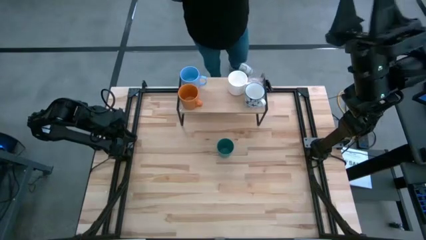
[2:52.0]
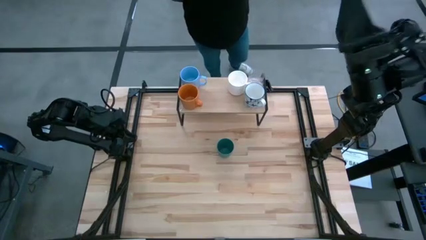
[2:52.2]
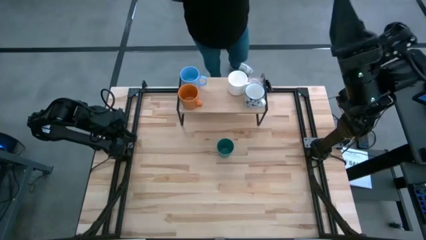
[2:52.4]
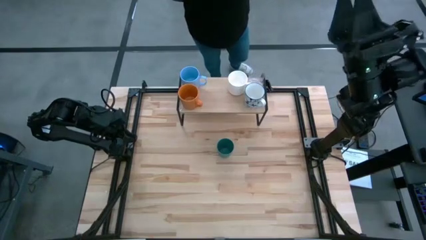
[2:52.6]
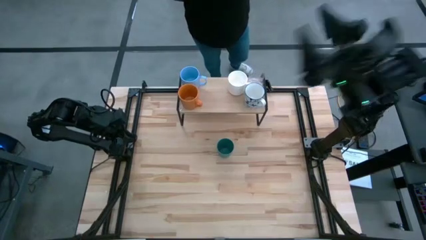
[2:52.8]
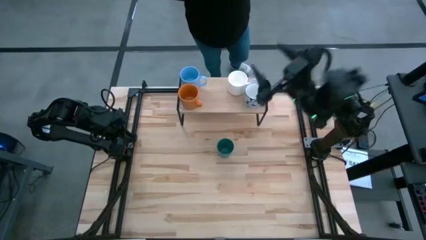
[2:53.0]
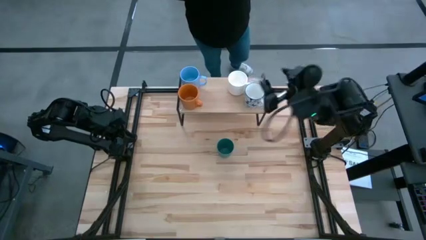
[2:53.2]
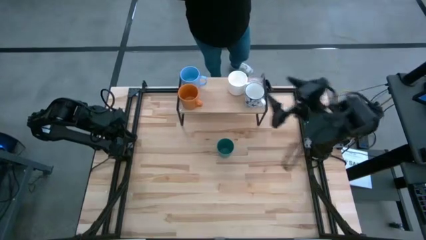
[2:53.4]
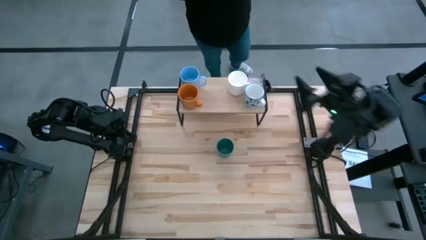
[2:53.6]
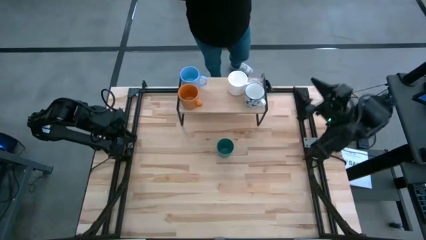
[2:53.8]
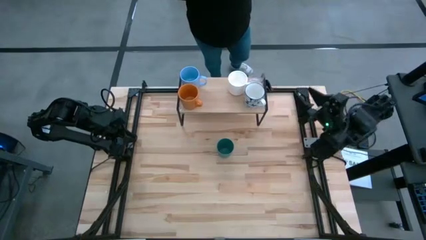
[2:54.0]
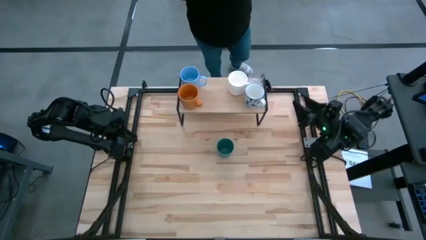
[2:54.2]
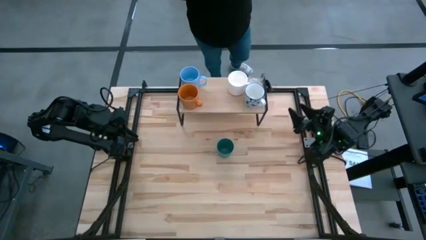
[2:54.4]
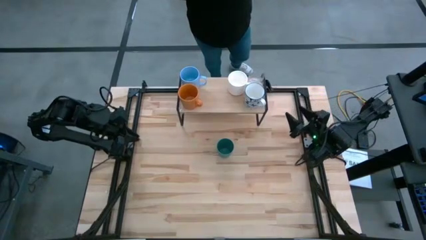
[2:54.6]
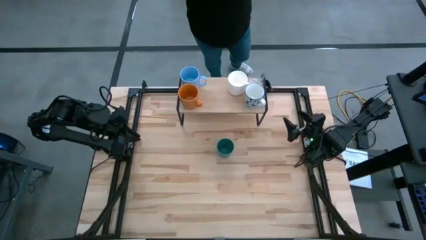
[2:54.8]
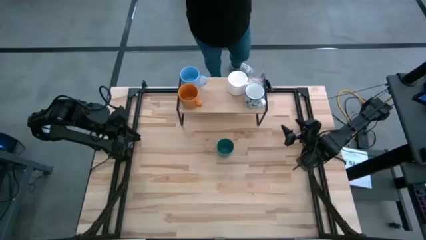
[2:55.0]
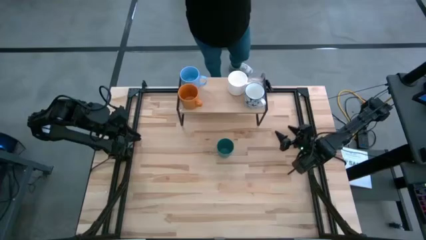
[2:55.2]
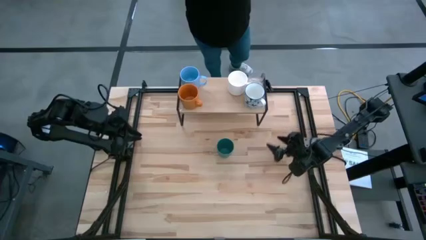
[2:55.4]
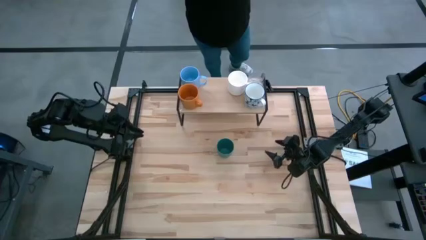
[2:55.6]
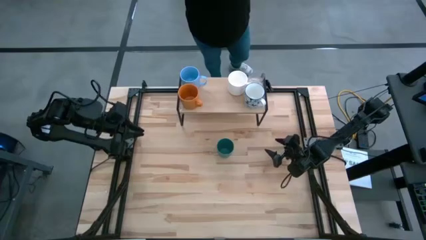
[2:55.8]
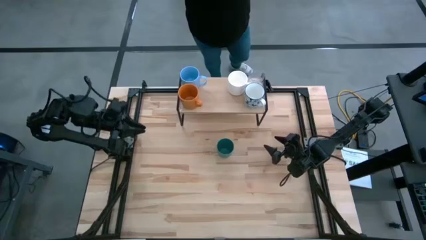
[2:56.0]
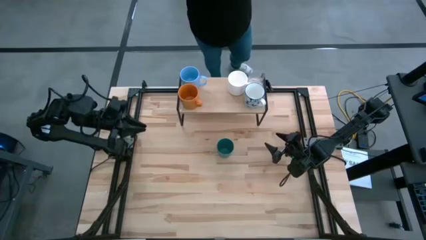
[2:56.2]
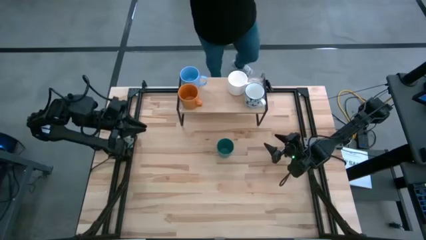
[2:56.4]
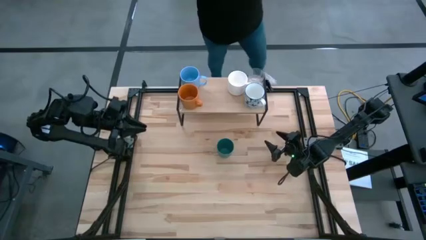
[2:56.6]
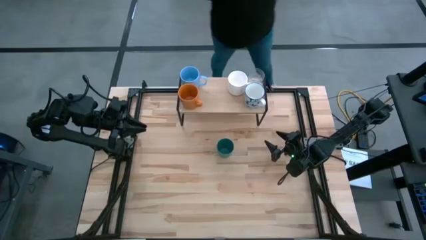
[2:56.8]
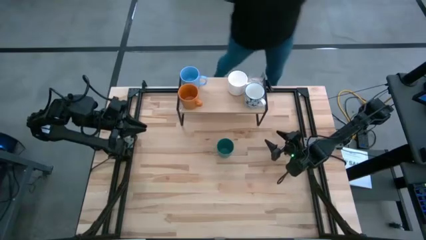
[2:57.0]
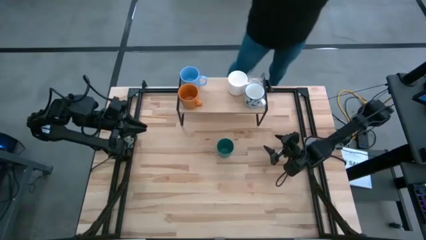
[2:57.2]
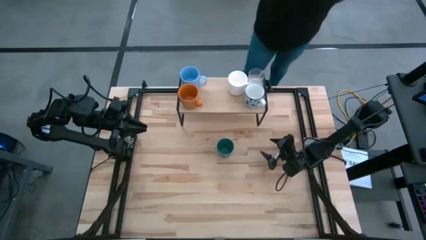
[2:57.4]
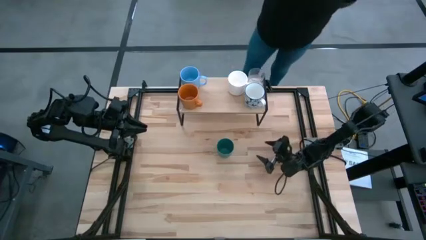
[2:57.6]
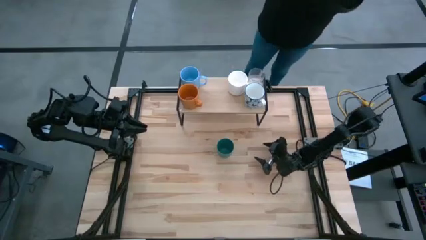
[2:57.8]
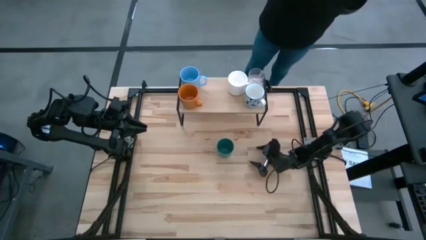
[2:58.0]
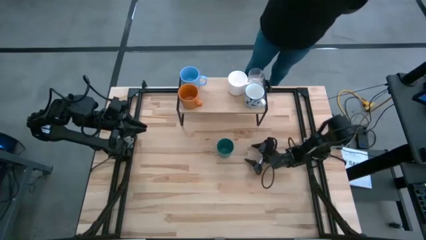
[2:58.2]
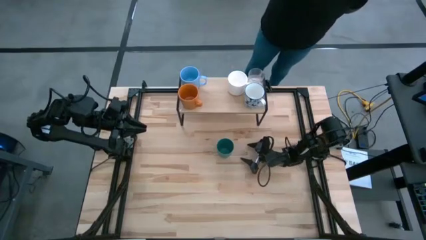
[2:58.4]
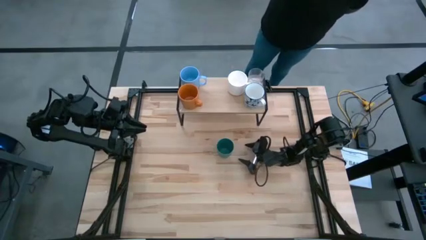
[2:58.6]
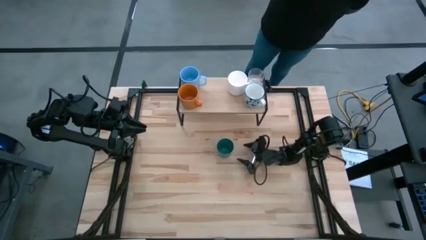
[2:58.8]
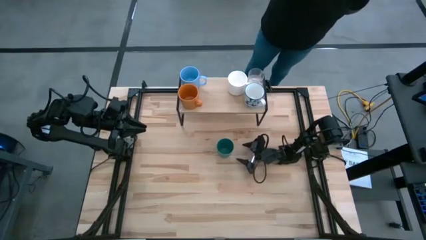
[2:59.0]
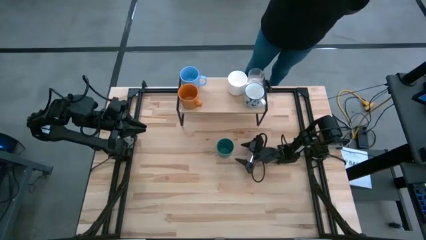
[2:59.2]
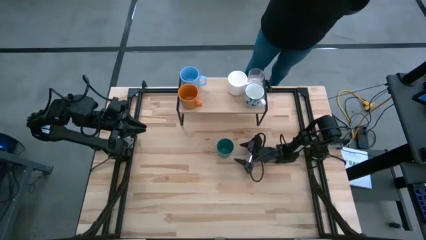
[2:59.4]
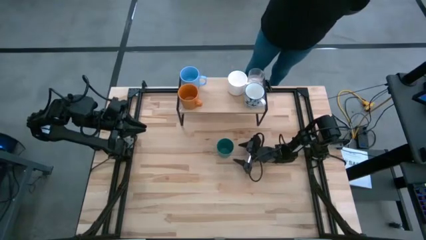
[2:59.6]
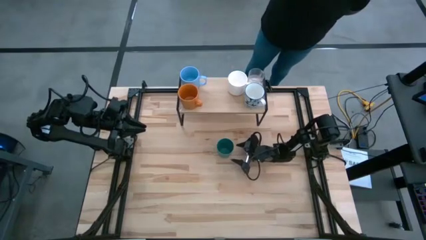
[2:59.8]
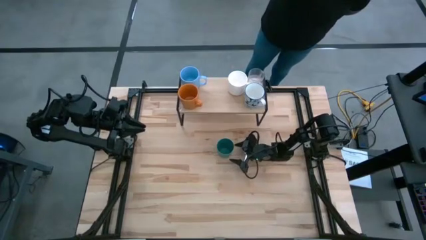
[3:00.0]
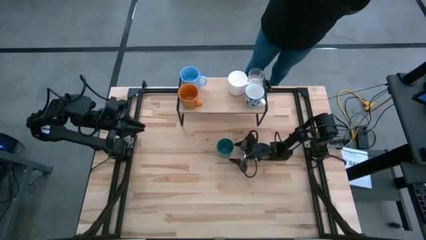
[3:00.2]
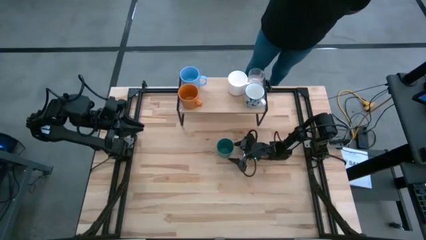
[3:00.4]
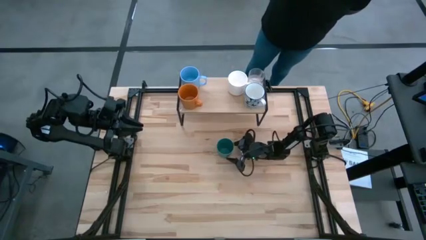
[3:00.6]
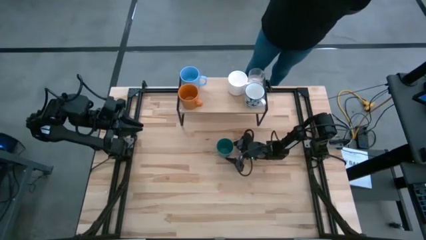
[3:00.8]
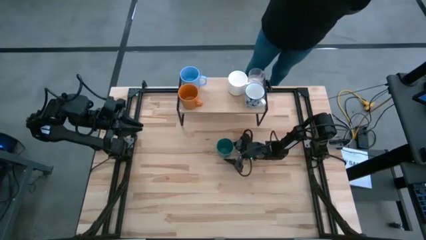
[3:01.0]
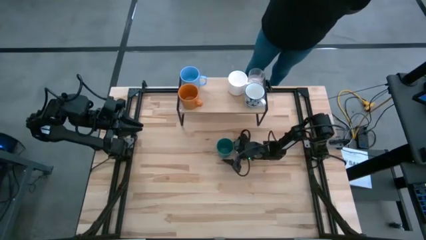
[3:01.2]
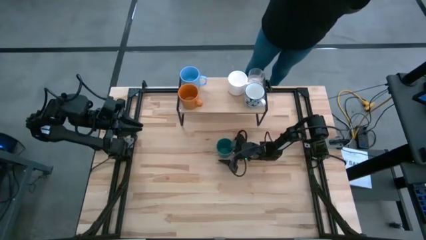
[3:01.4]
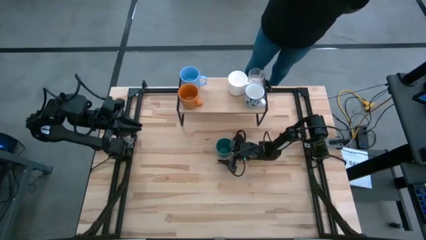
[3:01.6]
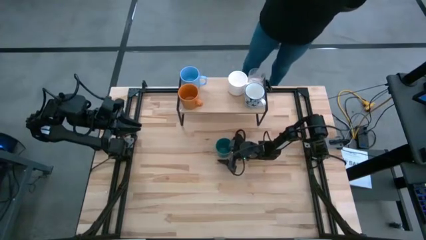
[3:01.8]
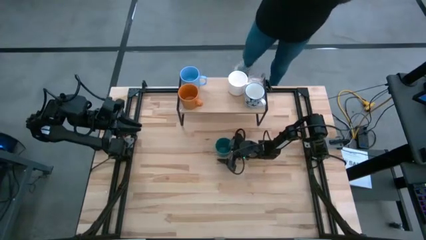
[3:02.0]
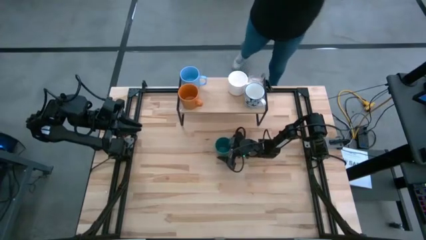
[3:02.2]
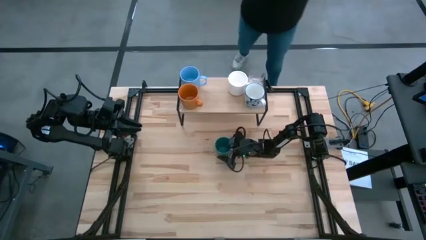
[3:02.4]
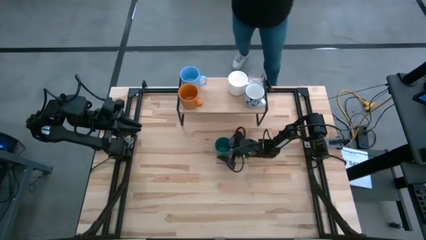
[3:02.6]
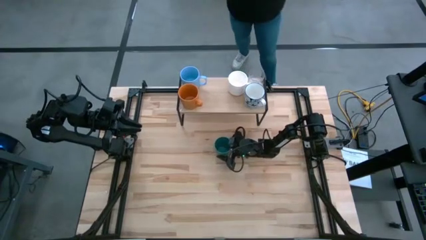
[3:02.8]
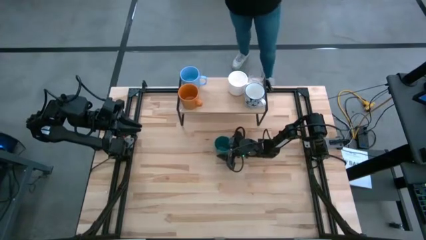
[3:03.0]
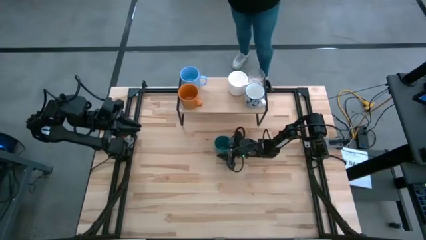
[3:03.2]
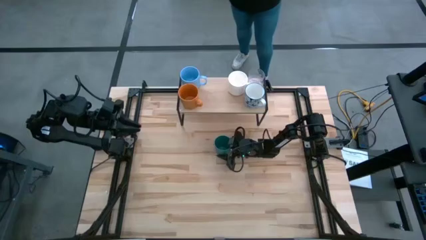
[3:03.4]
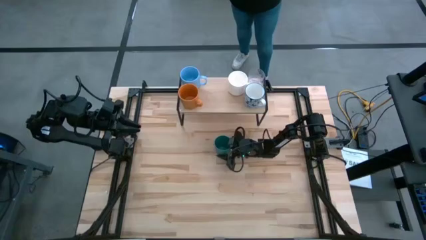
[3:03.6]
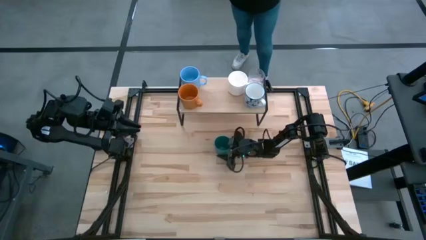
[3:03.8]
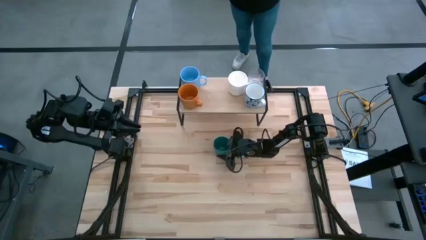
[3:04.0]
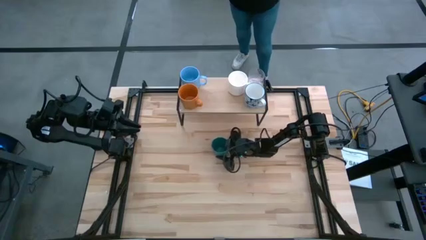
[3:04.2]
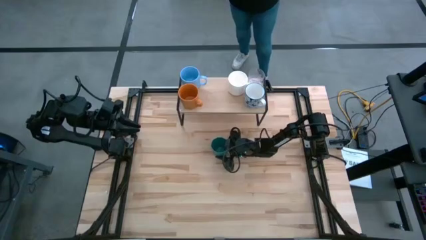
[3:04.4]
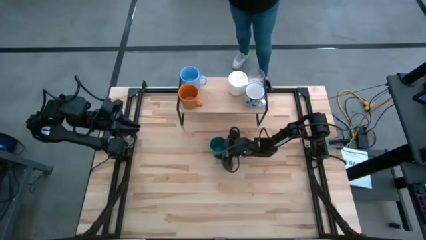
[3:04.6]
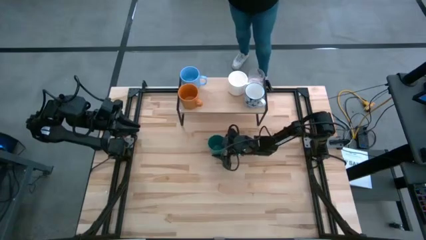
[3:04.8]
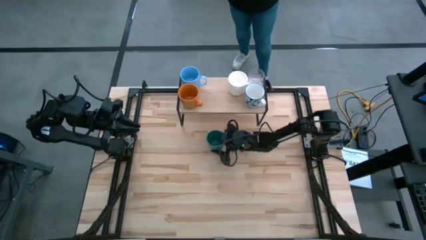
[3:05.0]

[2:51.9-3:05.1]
Task: Stack small to large cups/mugs on shelf
Put the green cup on the shelf

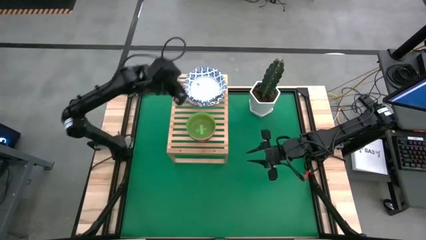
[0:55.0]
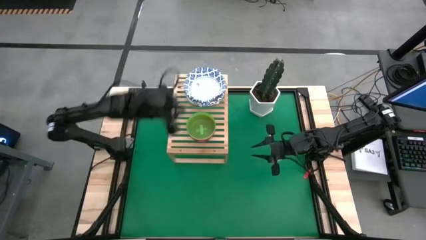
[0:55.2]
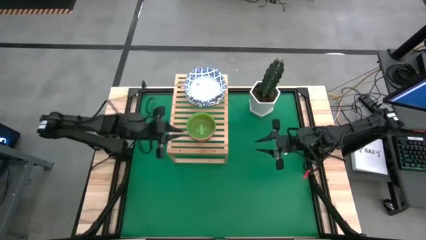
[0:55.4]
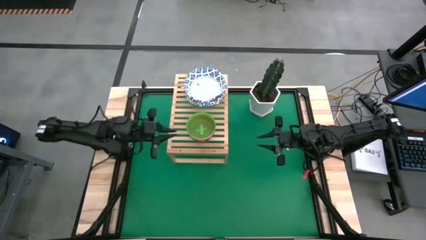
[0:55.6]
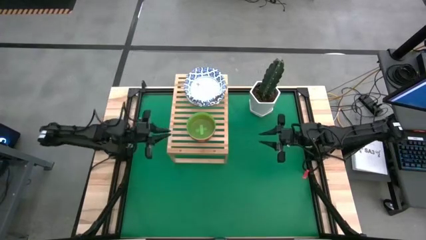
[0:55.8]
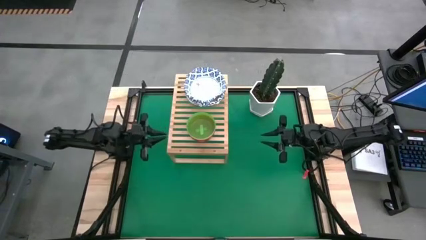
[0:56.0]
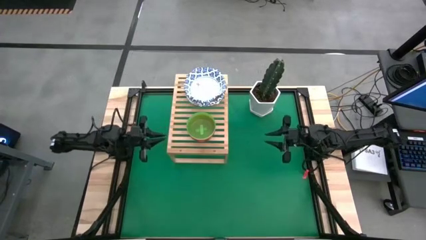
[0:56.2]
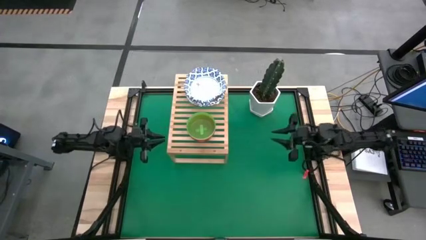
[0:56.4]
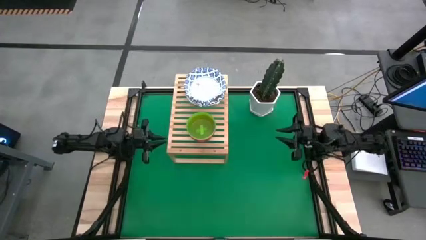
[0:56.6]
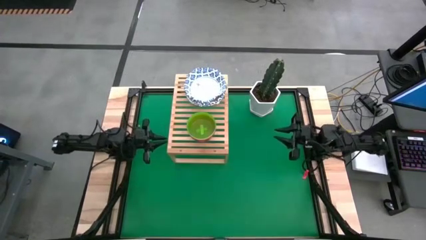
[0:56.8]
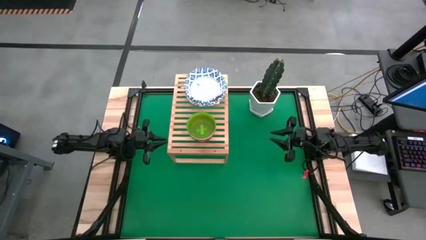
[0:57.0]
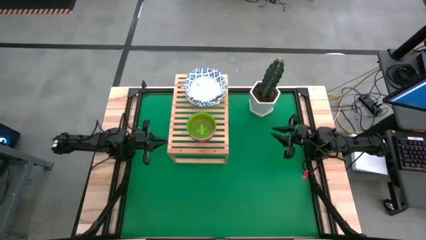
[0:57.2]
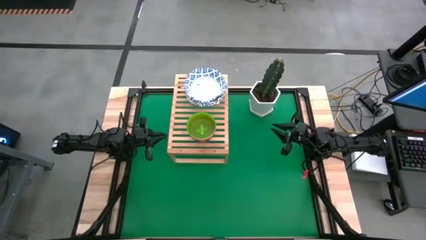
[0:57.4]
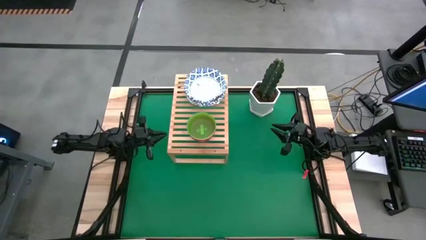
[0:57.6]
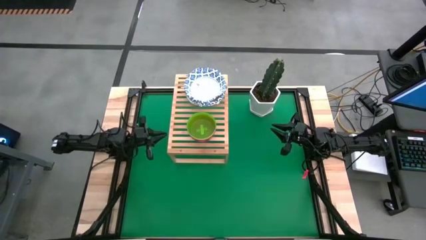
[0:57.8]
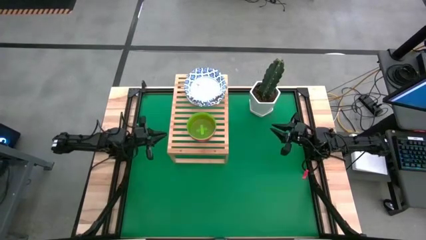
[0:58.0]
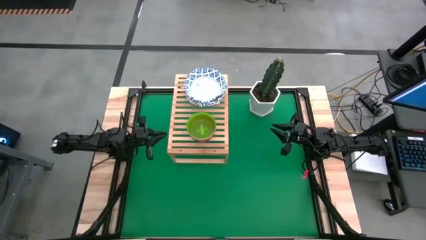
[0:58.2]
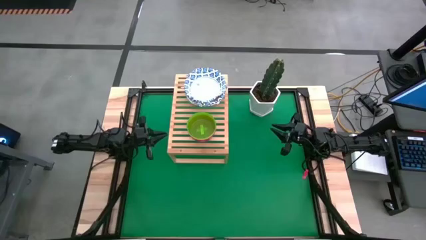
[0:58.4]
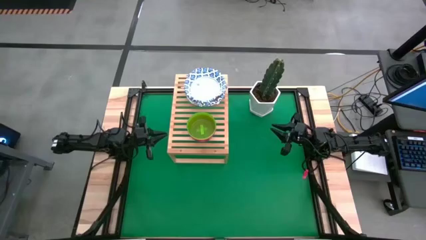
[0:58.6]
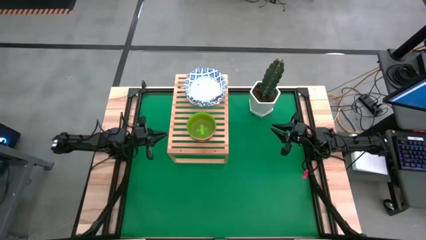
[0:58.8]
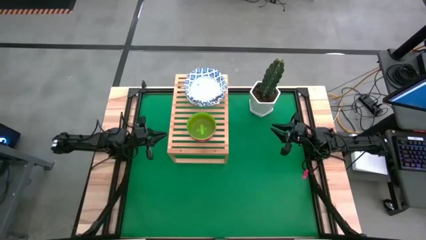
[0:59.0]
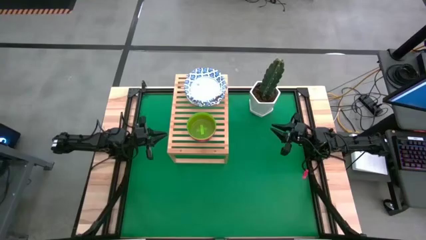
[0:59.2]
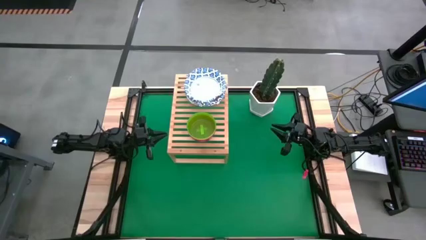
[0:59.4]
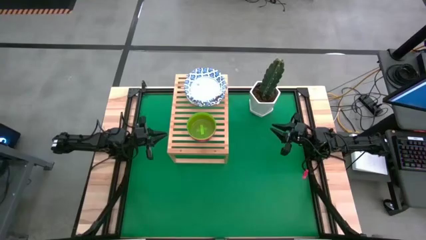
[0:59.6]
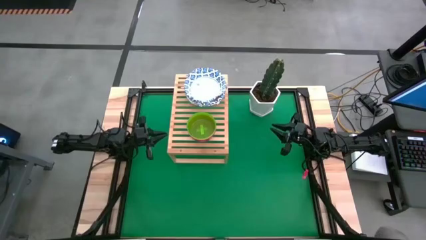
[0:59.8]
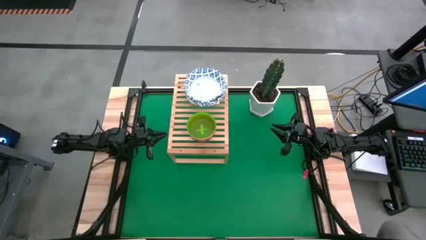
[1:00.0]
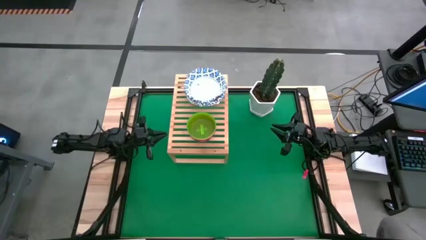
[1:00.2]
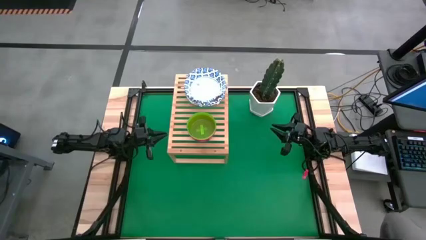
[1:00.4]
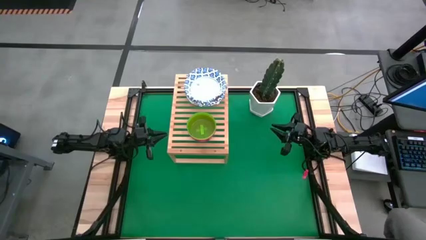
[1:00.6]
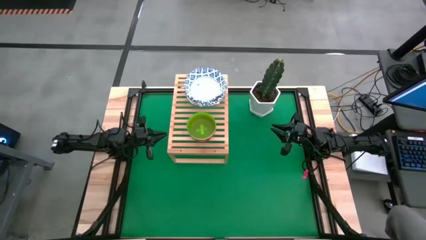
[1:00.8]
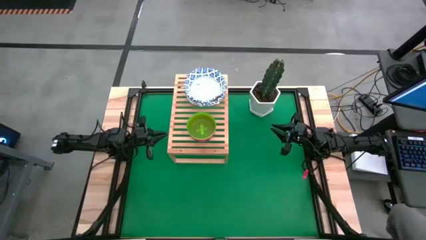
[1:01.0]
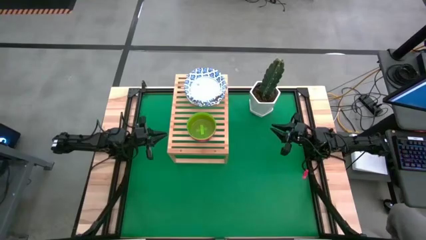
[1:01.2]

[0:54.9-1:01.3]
Task: Place and stack bowls onto a shelf
Return to Home Position
